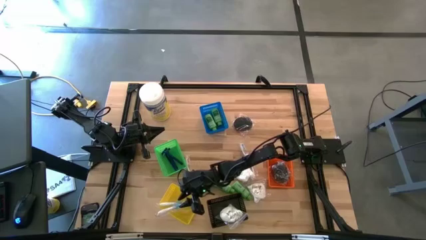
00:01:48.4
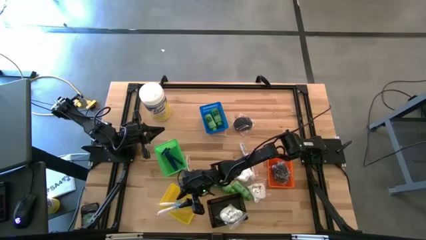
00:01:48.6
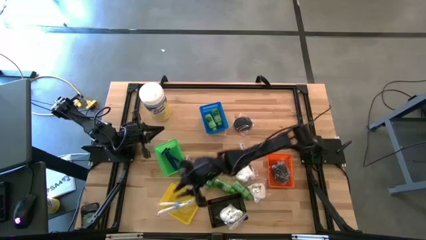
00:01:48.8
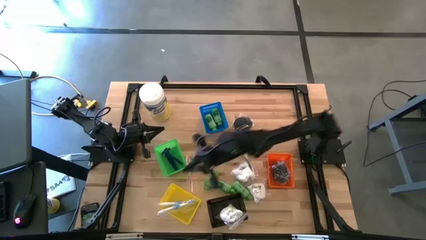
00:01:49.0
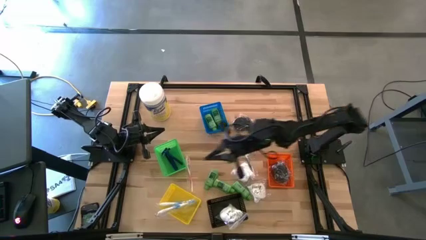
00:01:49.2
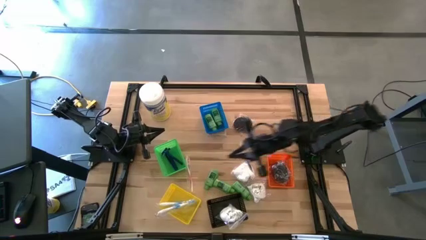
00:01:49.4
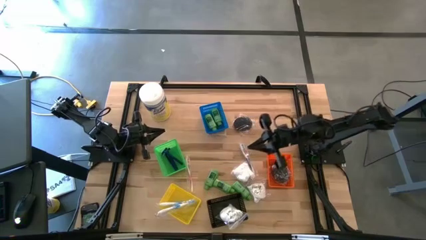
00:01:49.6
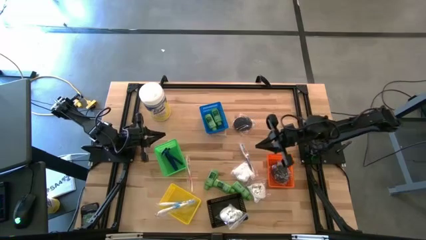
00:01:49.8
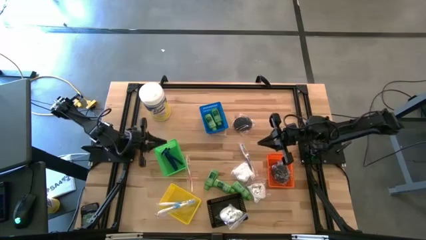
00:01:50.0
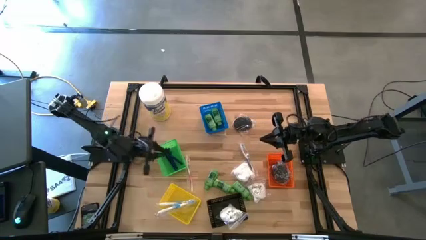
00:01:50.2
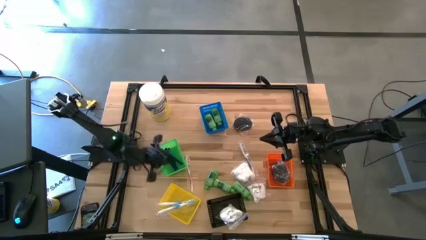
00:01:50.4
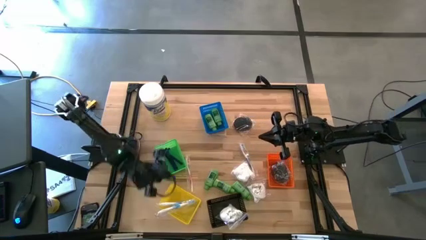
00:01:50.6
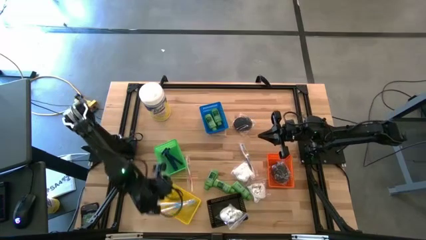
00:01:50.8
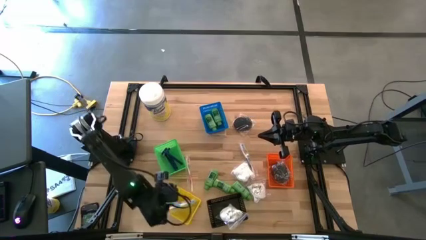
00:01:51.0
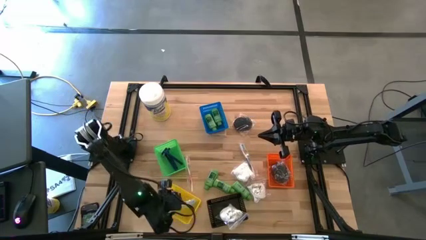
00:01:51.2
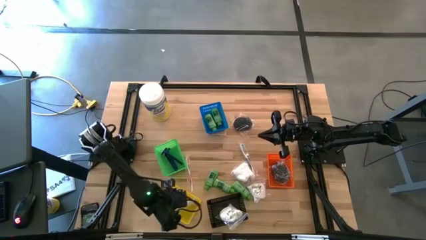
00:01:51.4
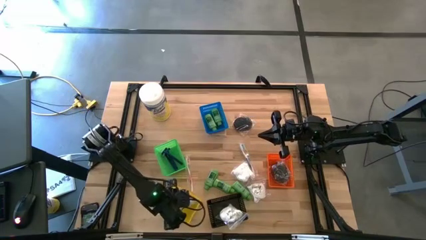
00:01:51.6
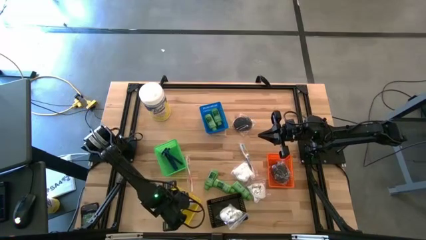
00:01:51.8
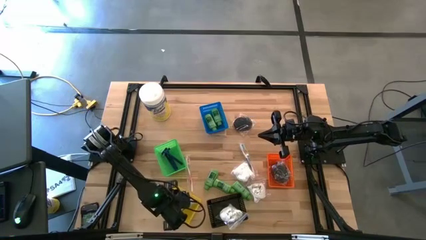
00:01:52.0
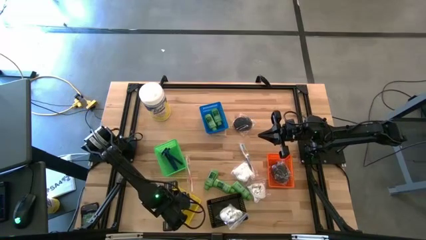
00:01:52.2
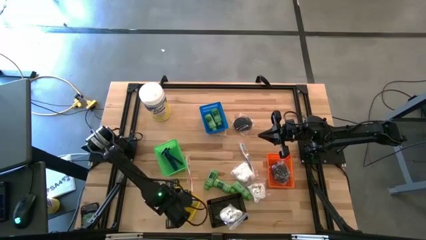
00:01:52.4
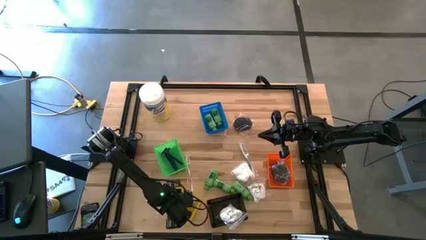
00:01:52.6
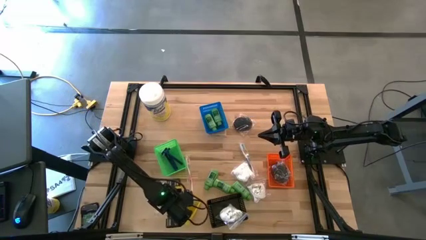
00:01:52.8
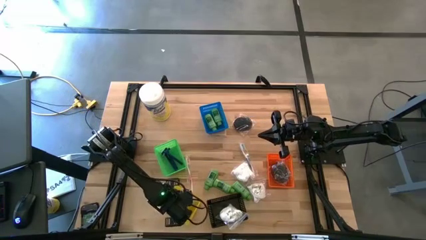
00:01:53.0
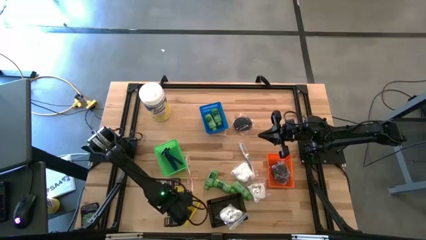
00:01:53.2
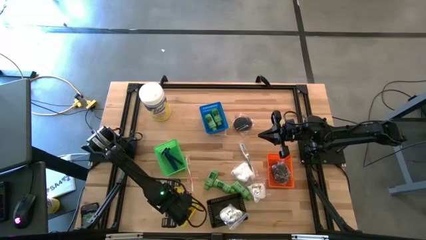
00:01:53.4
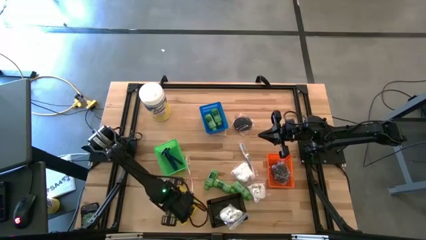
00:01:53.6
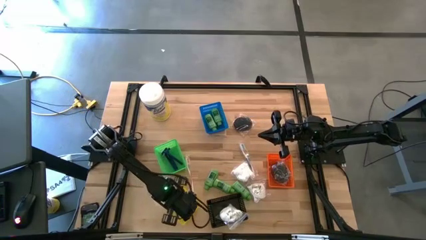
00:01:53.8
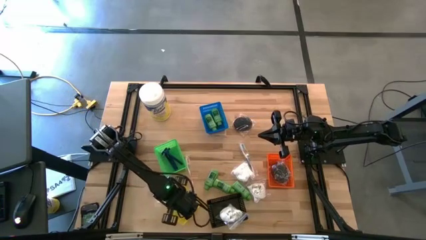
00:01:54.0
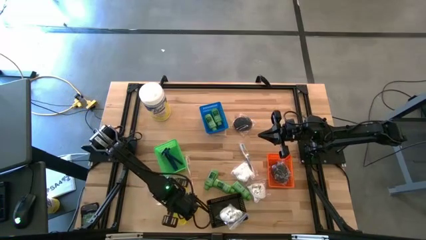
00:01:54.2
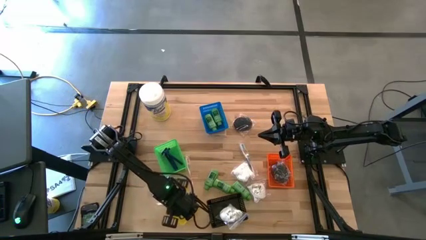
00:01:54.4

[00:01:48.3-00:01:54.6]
Task: Pick & Place Travel size toiletries
Put the blue toothbrush into the yellow bin

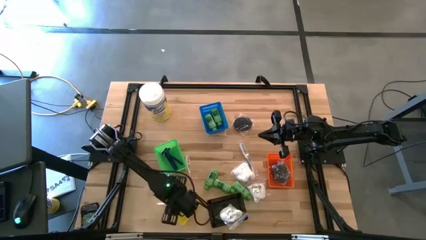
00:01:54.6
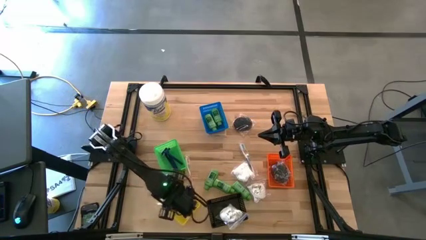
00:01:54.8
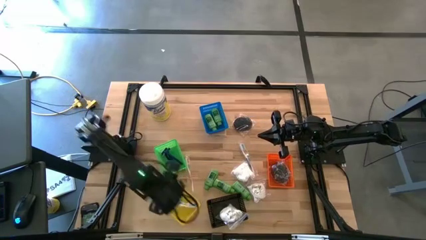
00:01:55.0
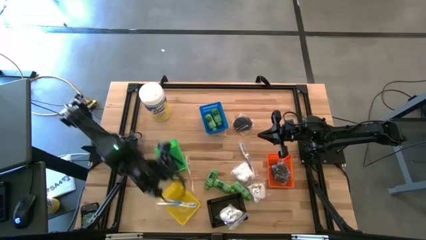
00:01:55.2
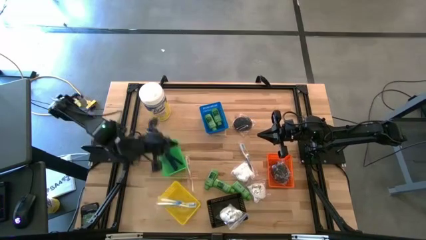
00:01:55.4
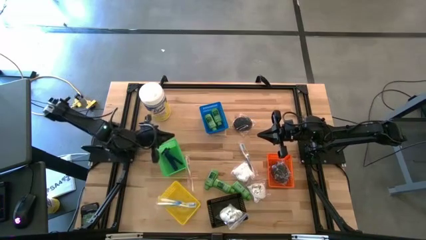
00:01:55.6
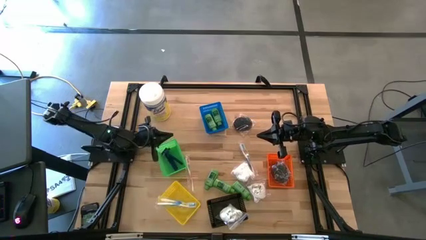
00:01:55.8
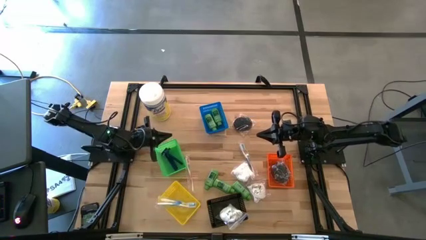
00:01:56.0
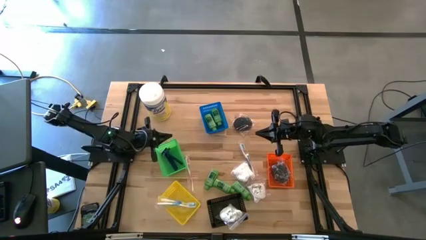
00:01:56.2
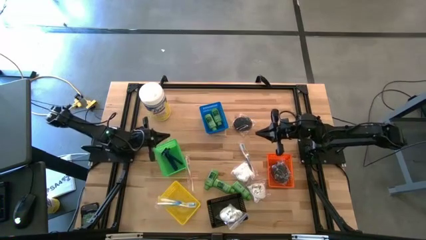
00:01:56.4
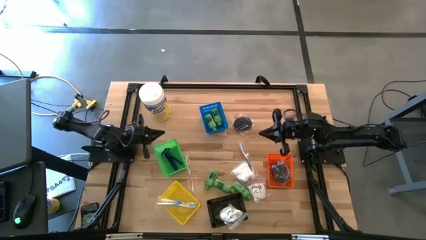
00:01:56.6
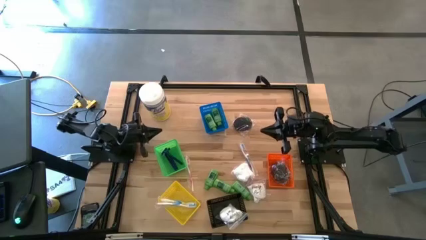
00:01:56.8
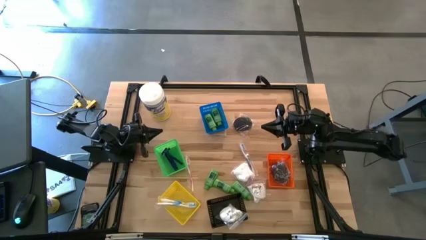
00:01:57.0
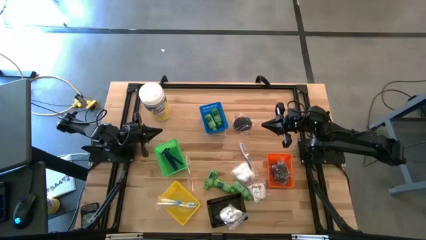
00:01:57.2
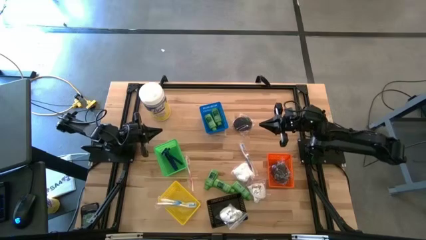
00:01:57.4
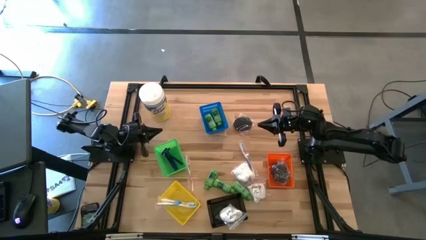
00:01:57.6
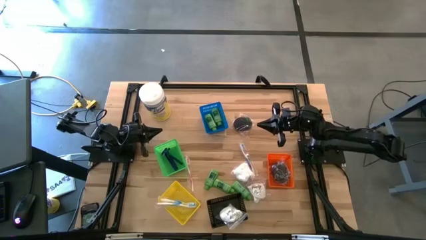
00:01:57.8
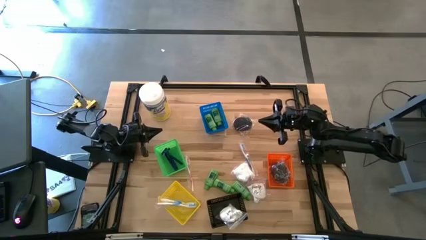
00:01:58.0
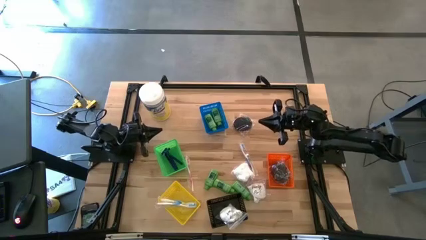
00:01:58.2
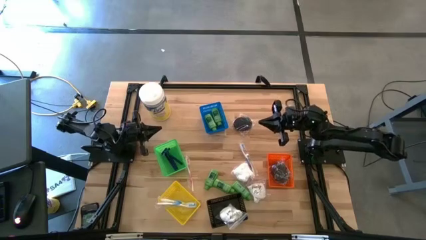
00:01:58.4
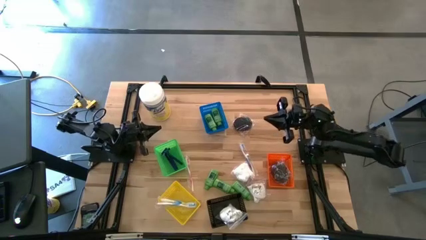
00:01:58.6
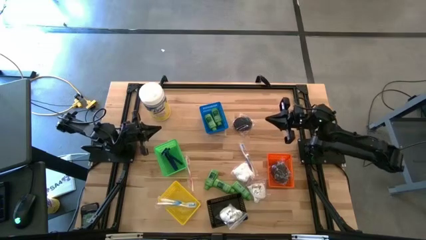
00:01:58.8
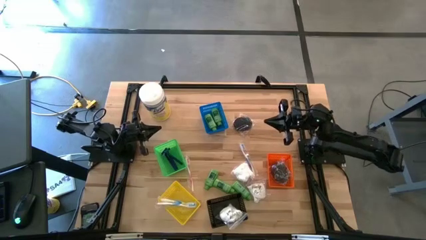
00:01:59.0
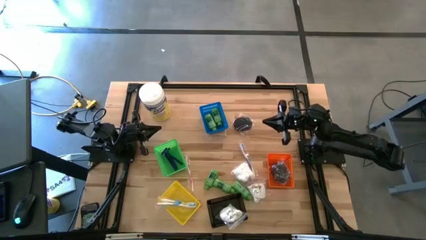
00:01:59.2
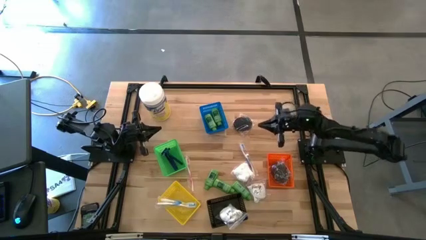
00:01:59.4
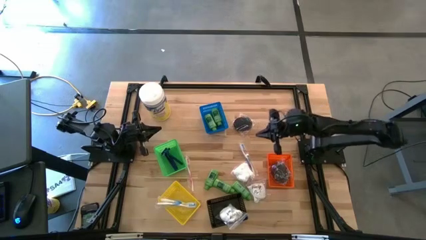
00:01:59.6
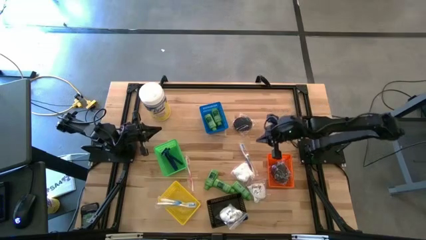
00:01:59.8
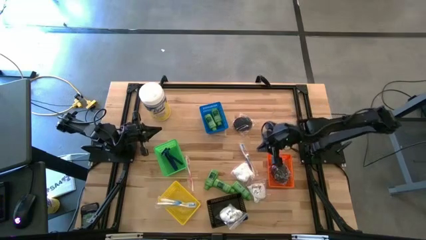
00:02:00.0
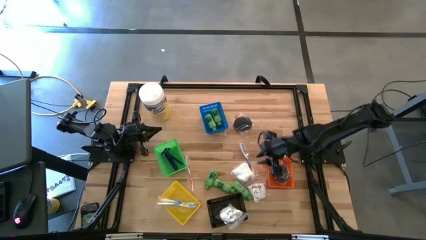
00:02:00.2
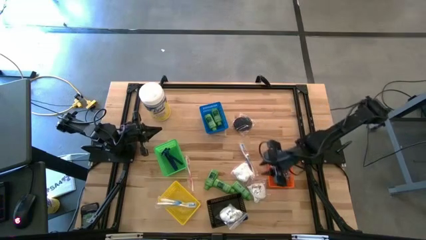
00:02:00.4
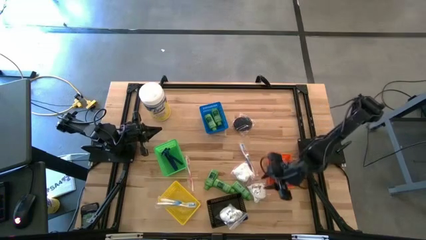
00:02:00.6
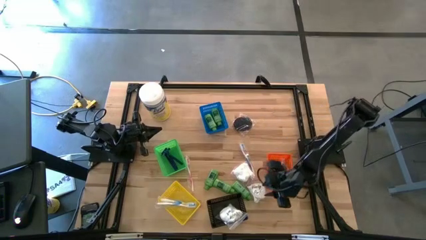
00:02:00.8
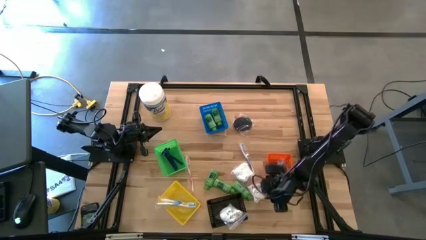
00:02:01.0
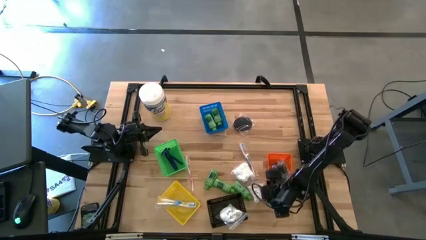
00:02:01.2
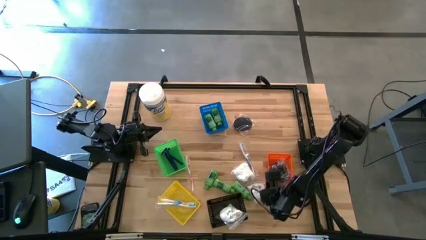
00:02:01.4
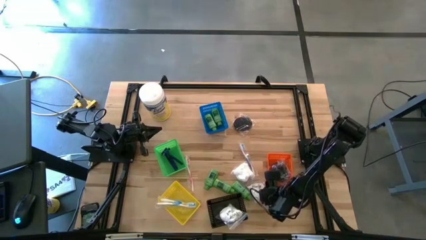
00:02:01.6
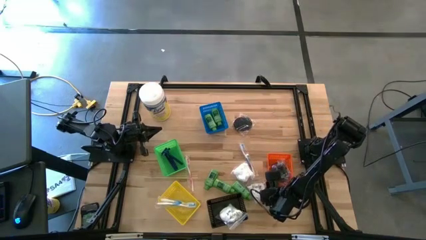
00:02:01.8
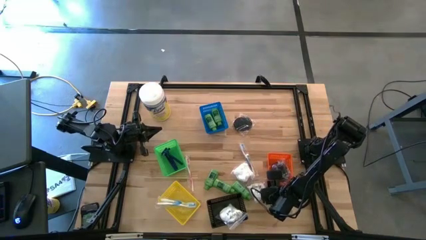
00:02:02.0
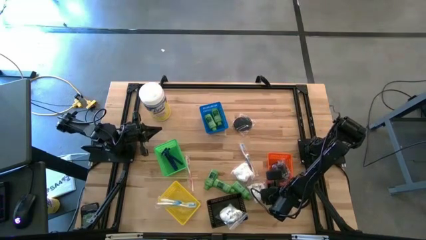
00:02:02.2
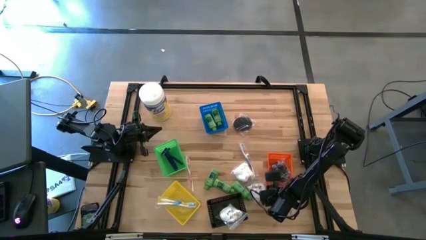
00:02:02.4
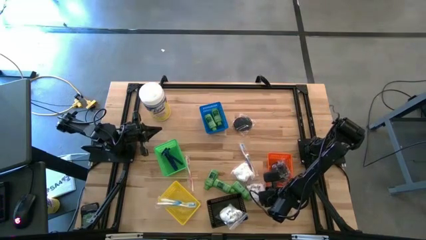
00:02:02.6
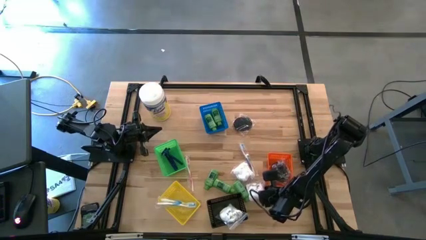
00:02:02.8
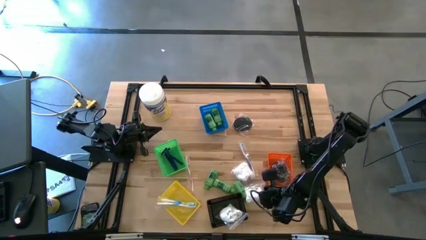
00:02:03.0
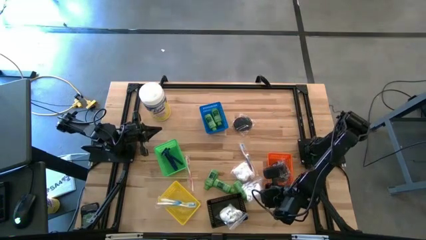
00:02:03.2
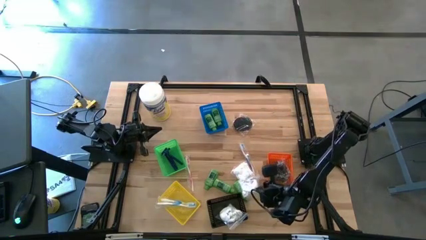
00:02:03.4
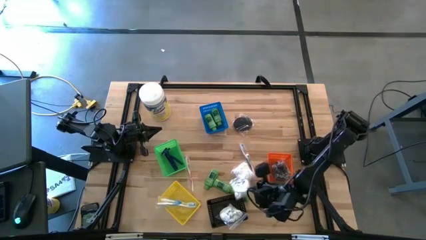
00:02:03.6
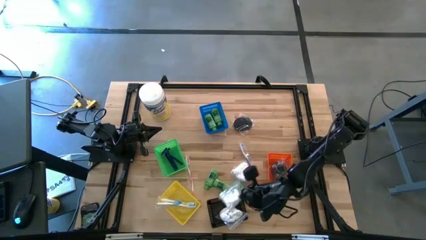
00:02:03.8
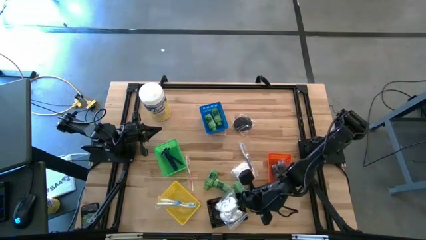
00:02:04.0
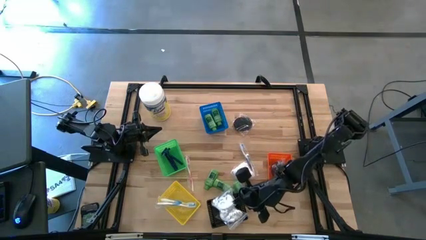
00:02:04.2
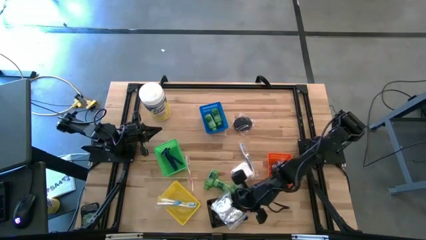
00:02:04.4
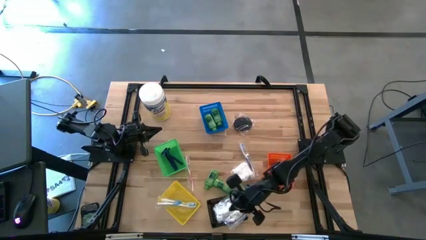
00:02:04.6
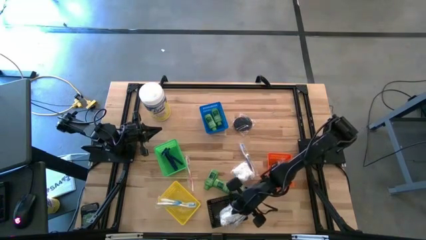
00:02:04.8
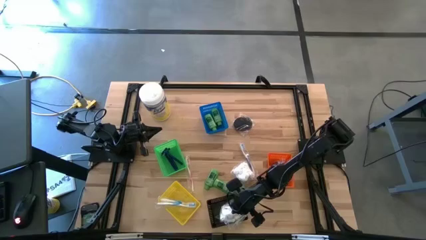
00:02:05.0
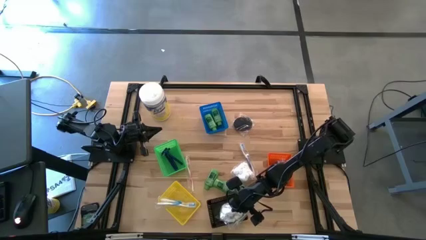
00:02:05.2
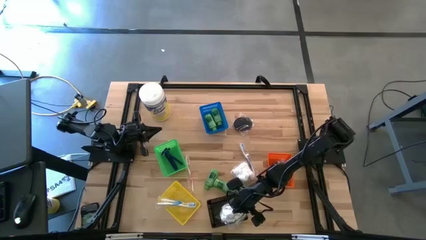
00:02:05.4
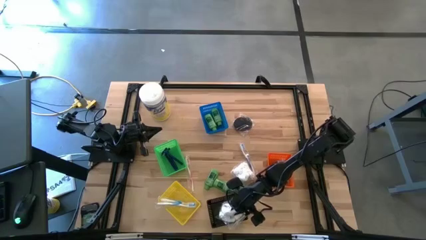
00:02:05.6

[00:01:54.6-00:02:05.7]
Put the cotton pack into the black bin

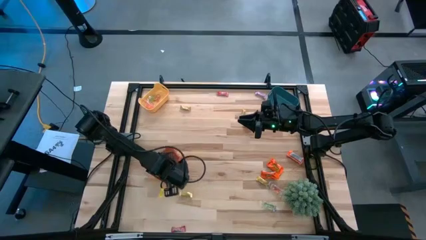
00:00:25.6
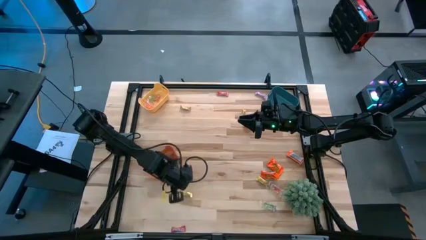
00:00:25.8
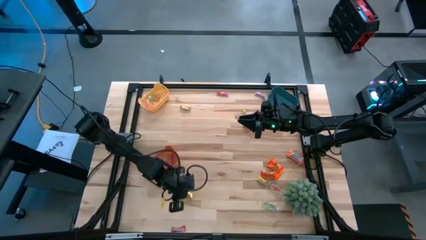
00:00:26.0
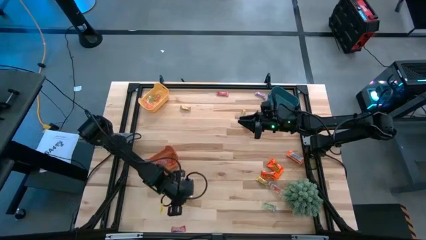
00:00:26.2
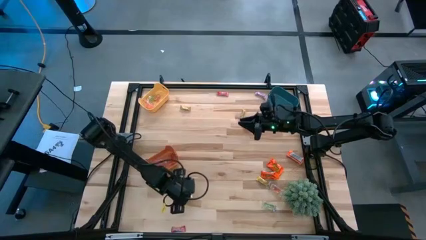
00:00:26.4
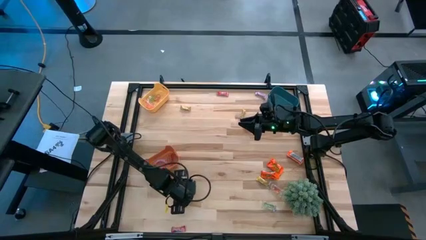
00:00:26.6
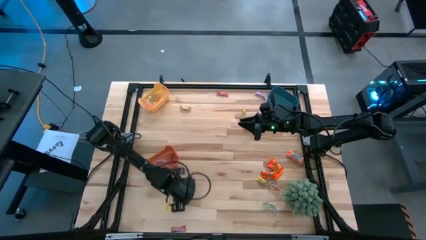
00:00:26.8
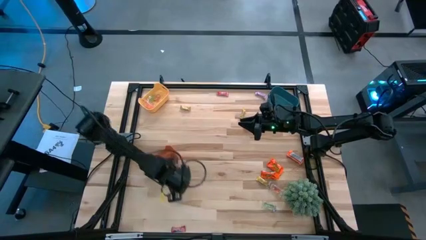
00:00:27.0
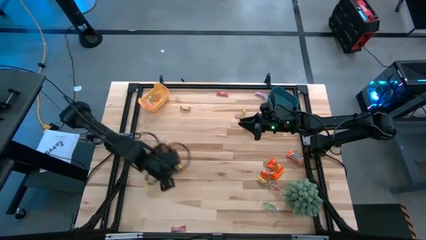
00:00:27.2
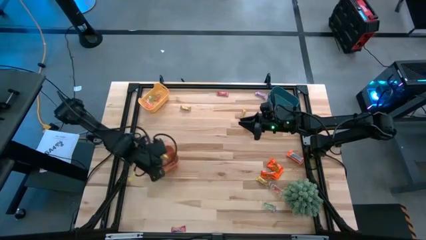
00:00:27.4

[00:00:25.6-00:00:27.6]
Task: Sort candy
Put the bottom left yellow candy into the orange bin
